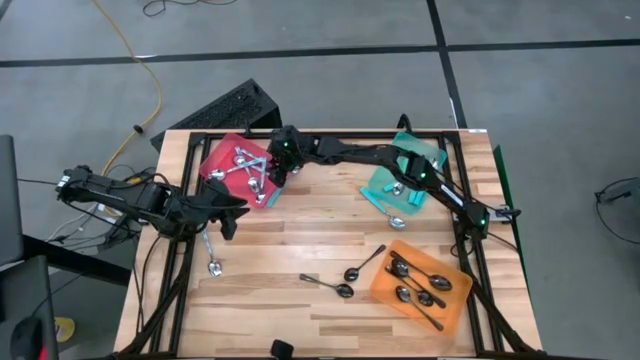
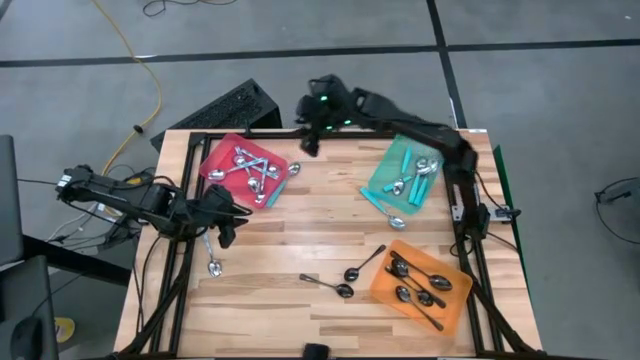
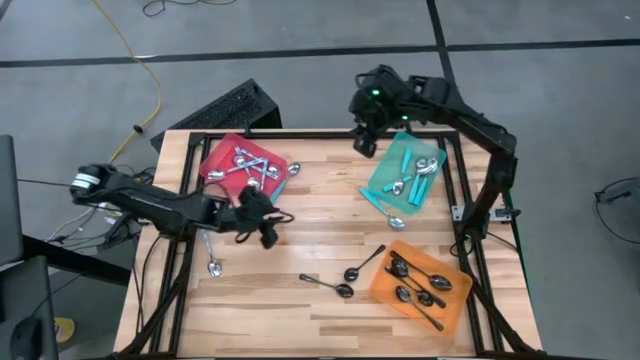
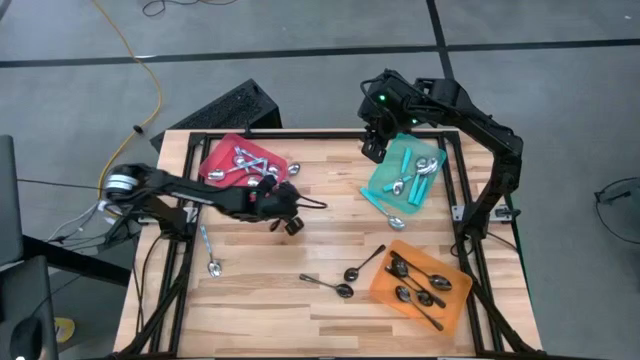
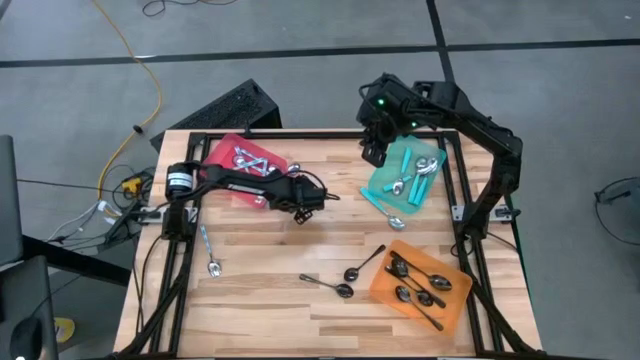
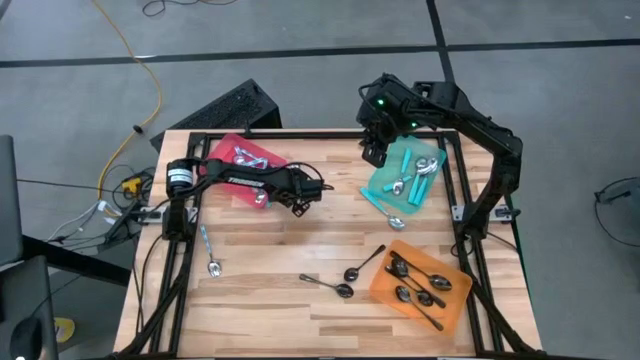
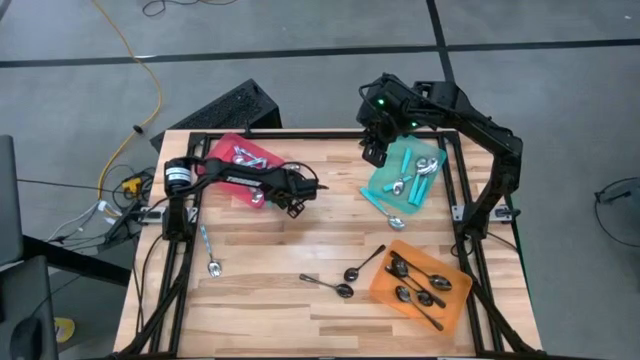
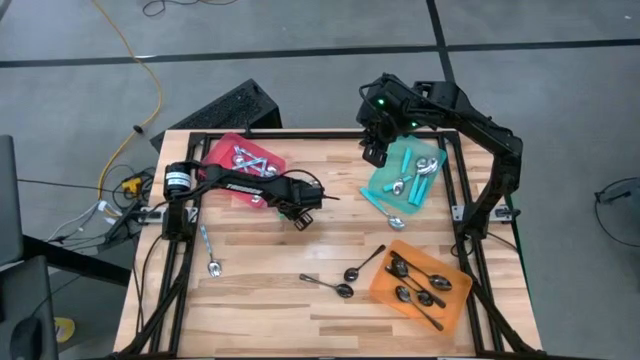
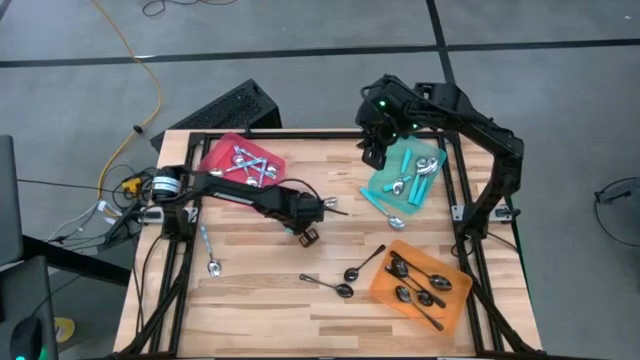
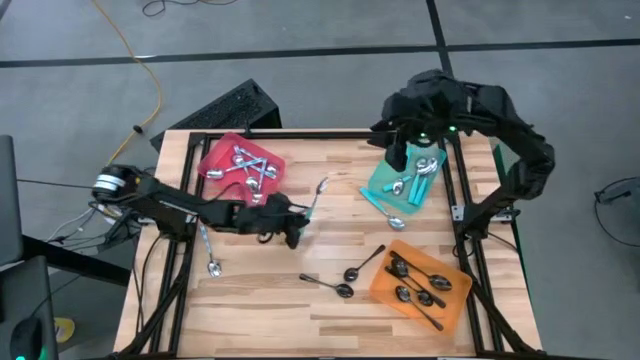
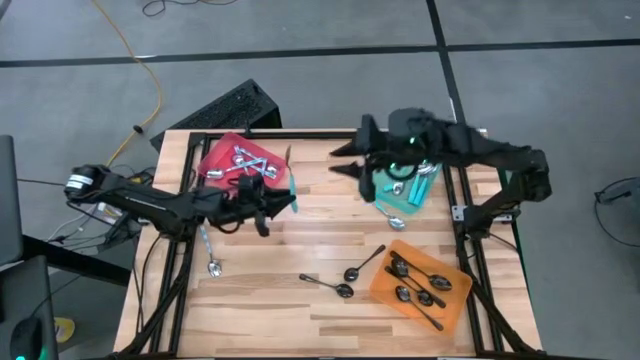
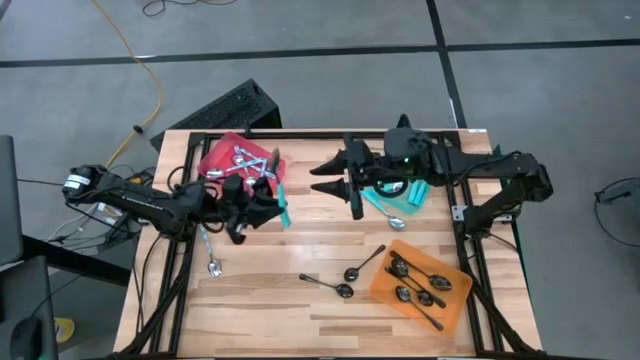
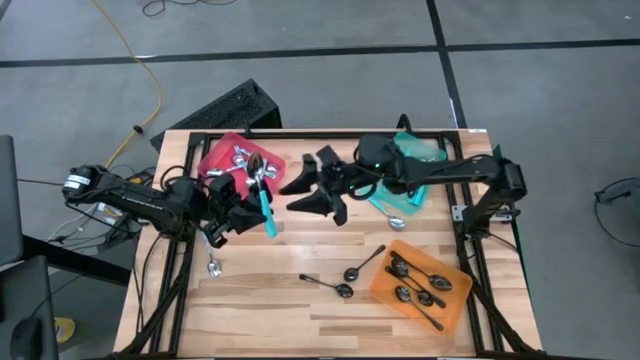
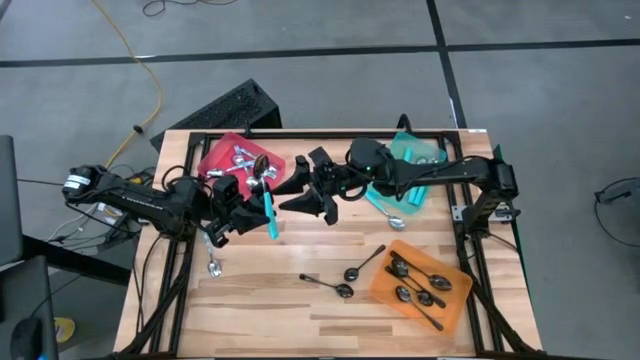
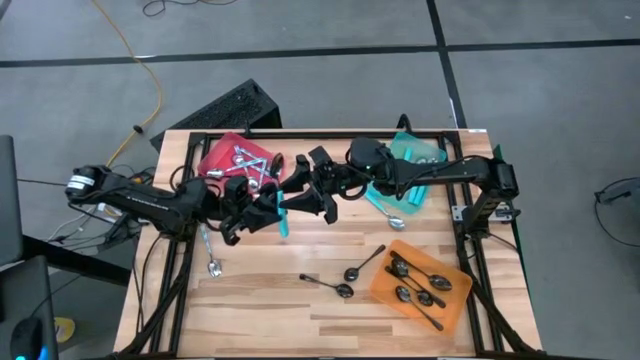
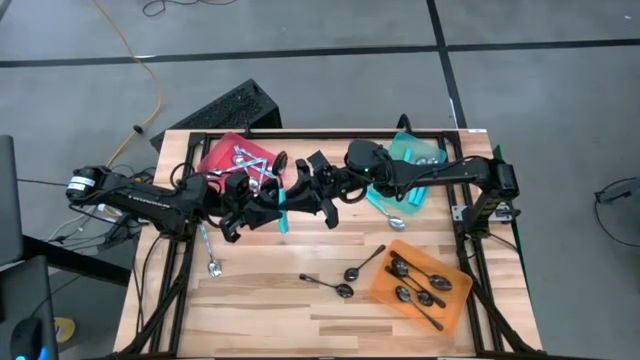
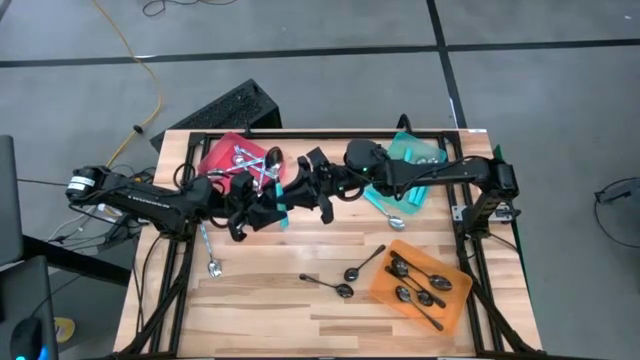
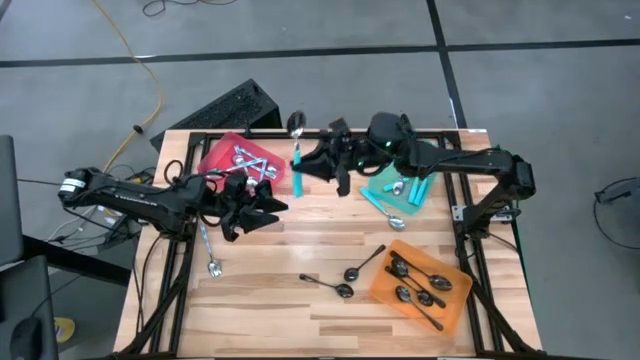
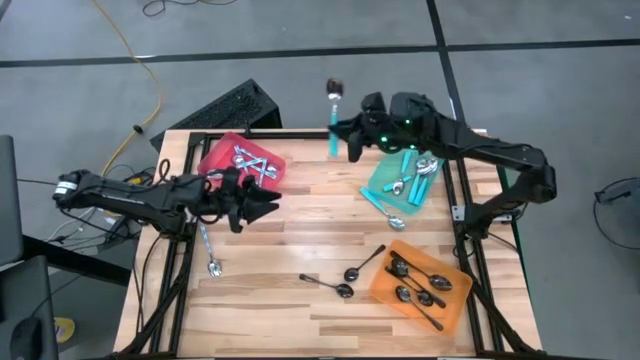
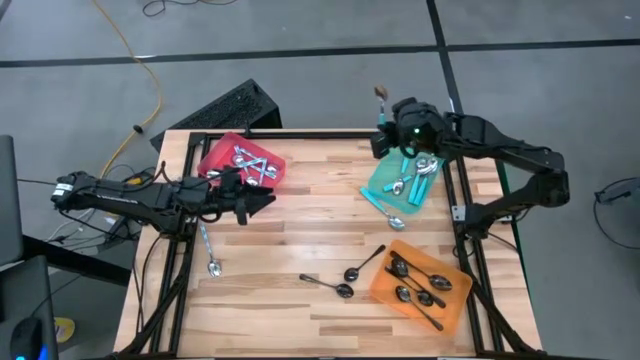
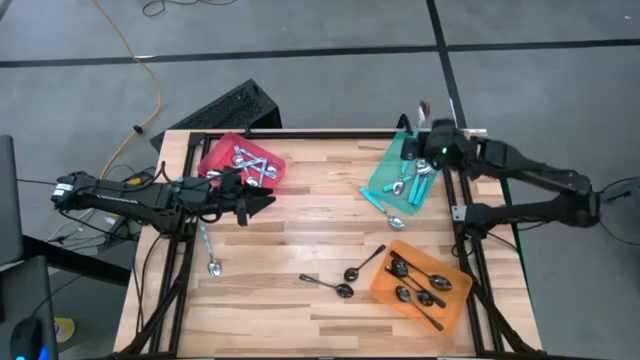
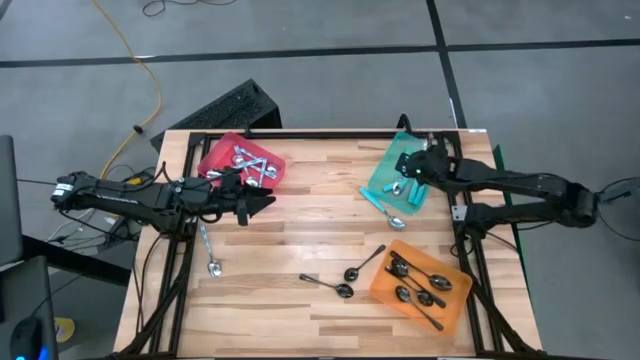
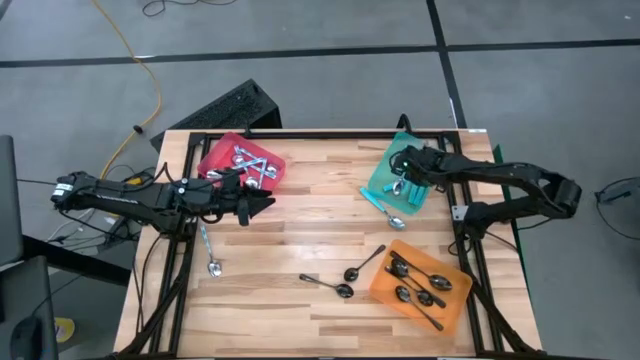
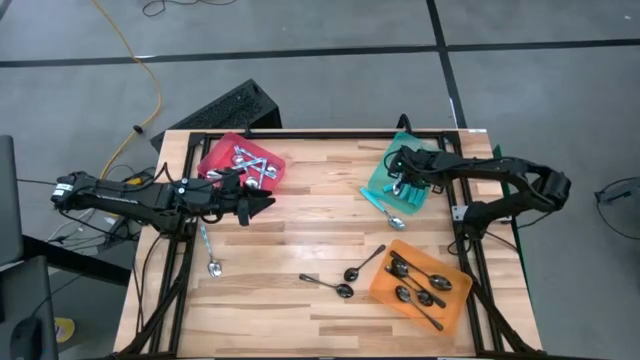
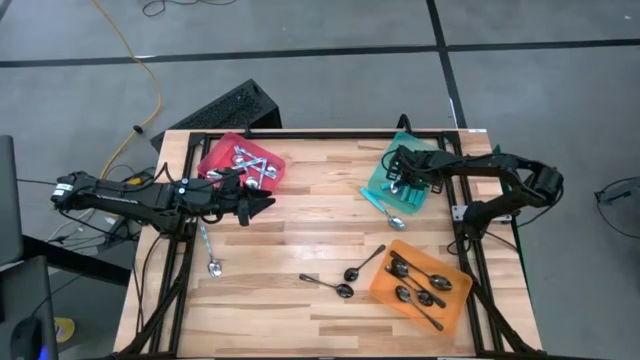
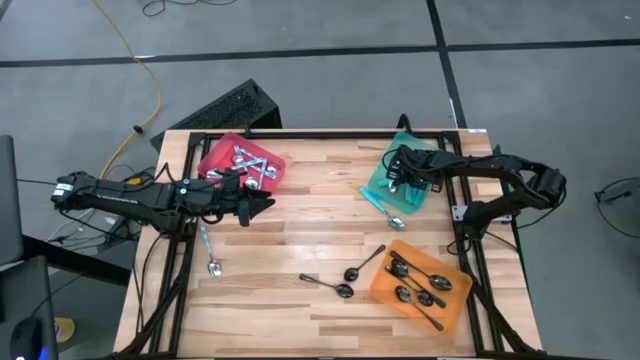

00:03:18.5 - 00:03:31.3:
Task: Sort silverware by color (type)
Put the blue spoon into the blue bin

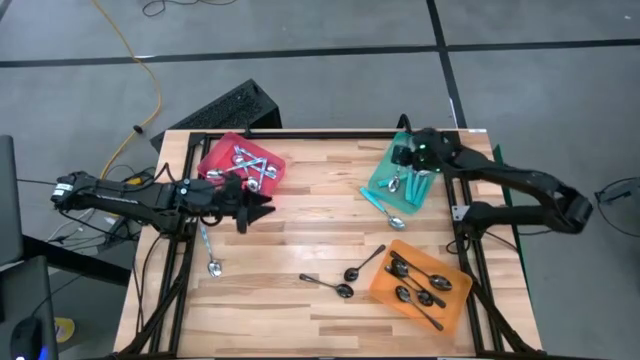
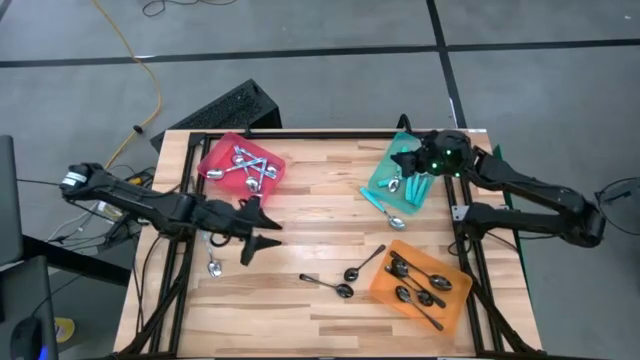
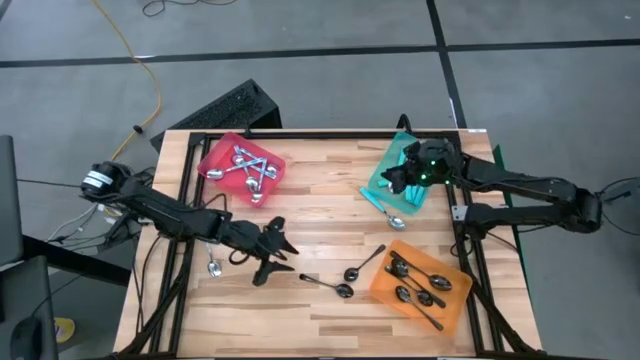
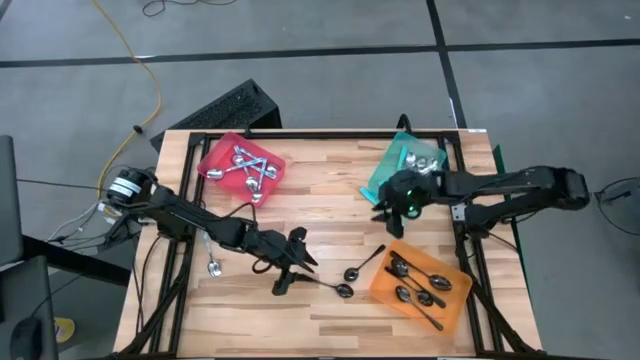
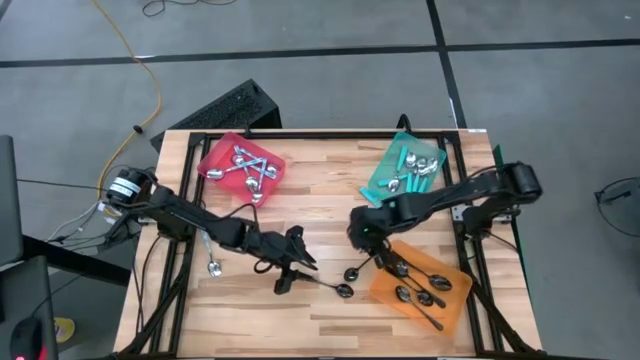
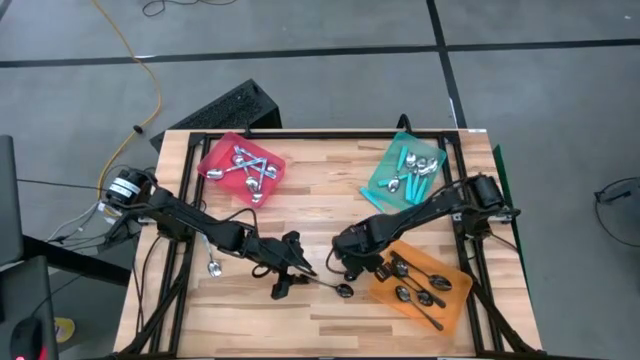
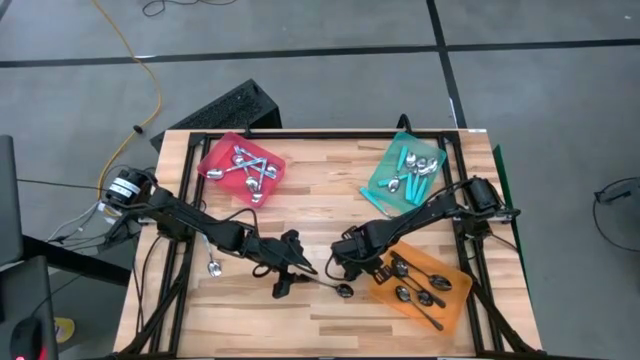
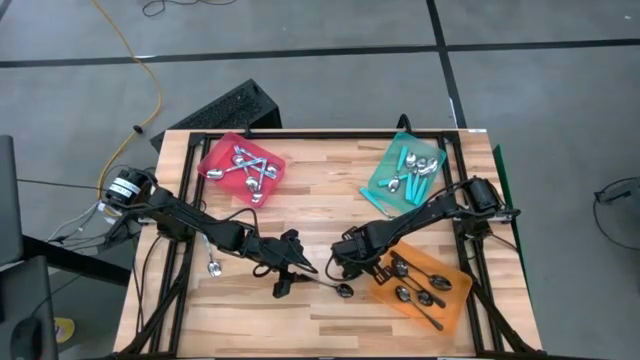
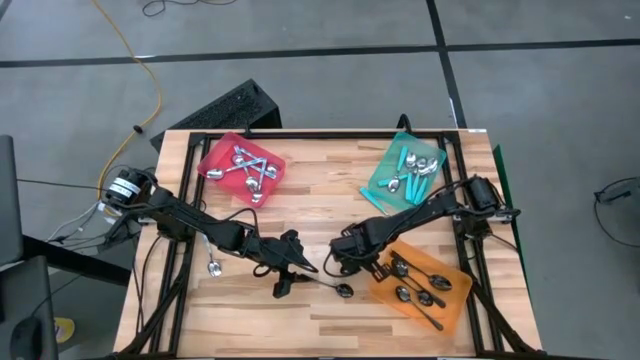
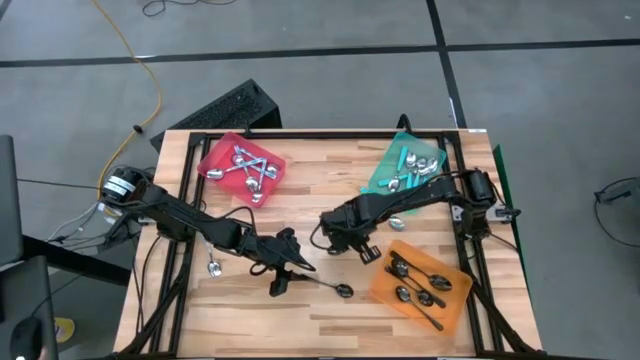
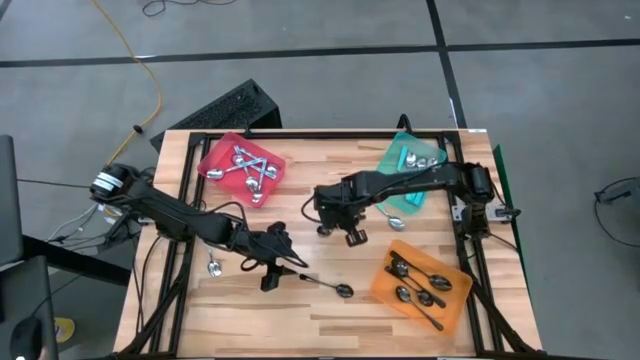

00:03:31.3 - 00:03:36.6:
Put the black spoon into the orange bin

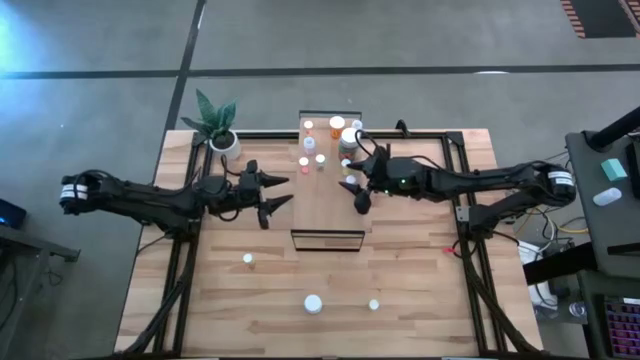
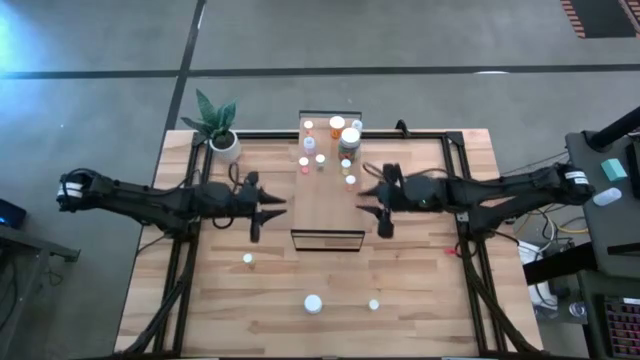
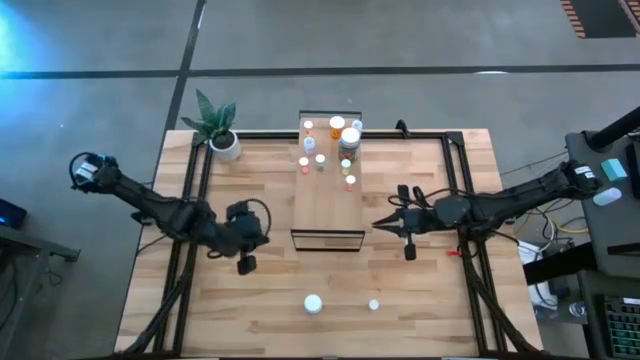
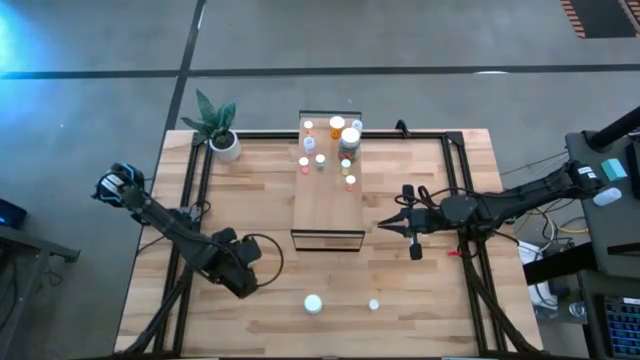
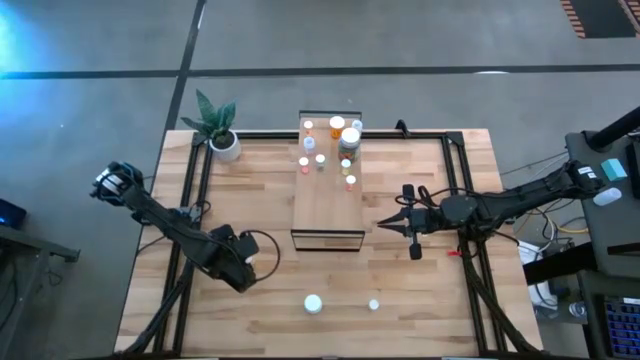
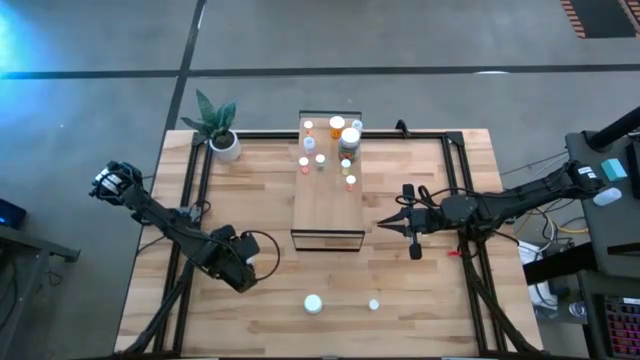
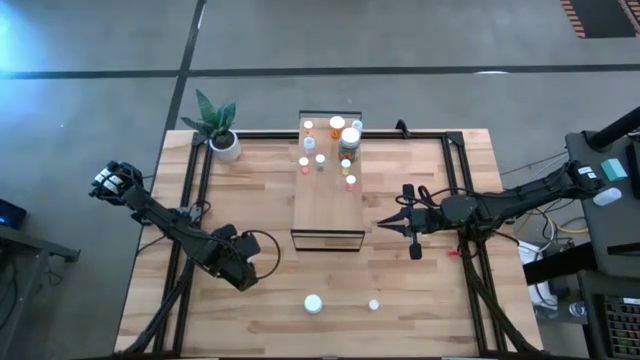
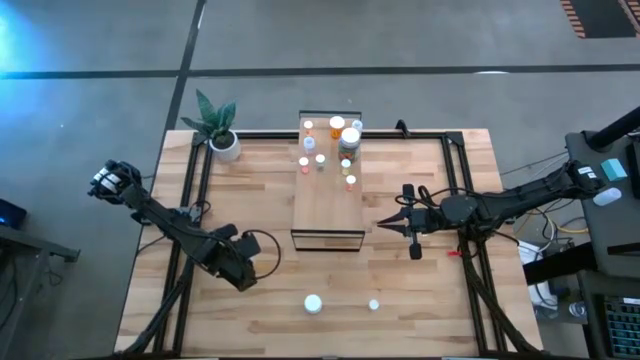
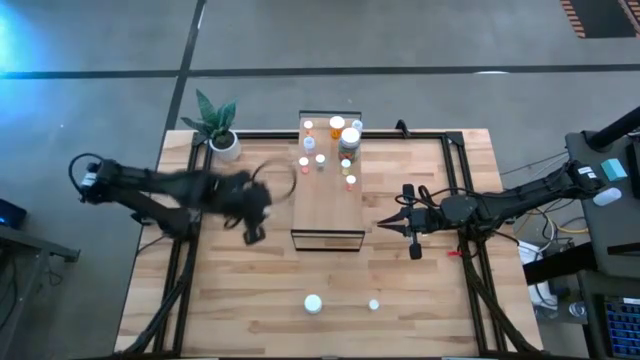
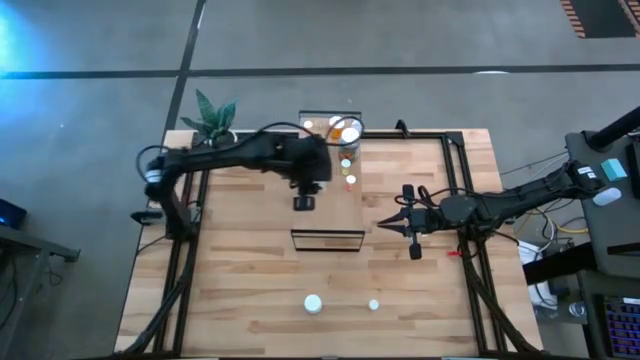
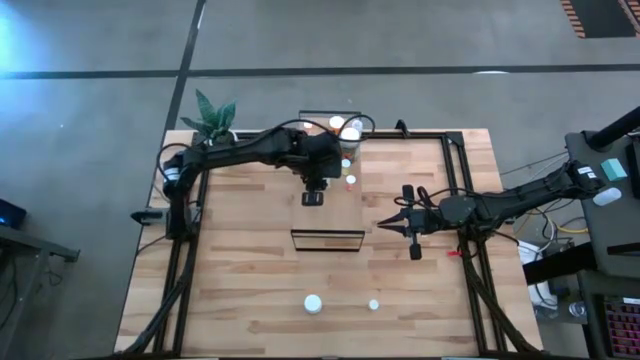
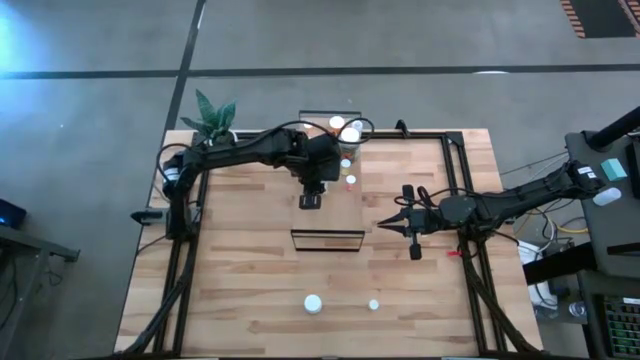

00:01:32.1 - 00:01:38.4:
Task: Pick and place medicine bottles onto shelf by color
Put the left yellow pill bottle on the shelf
